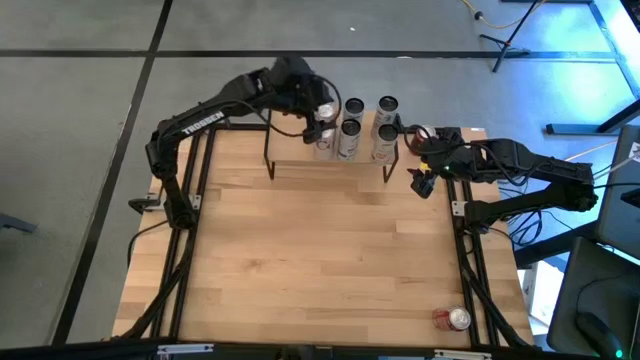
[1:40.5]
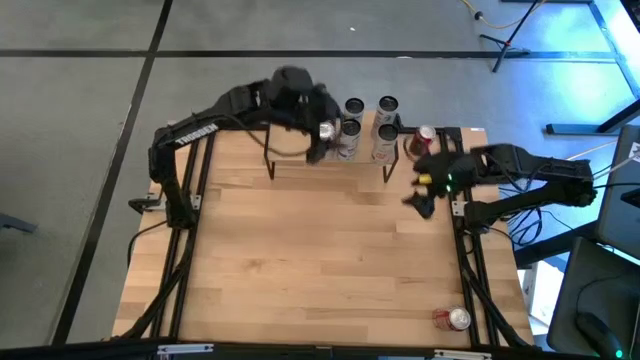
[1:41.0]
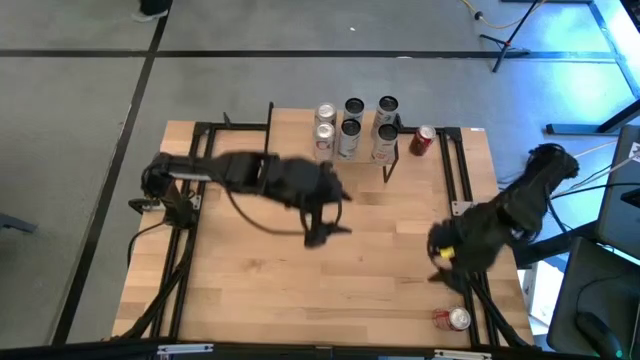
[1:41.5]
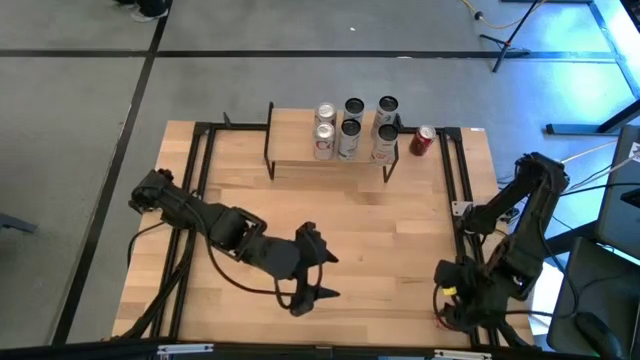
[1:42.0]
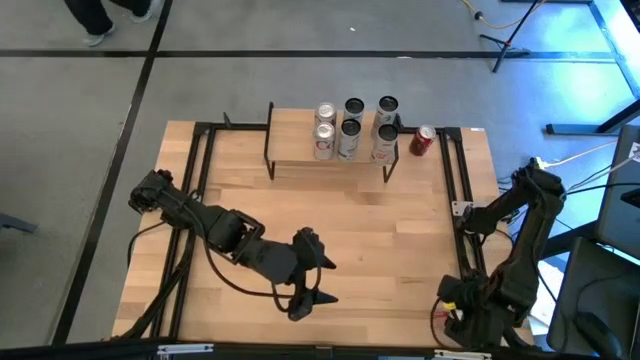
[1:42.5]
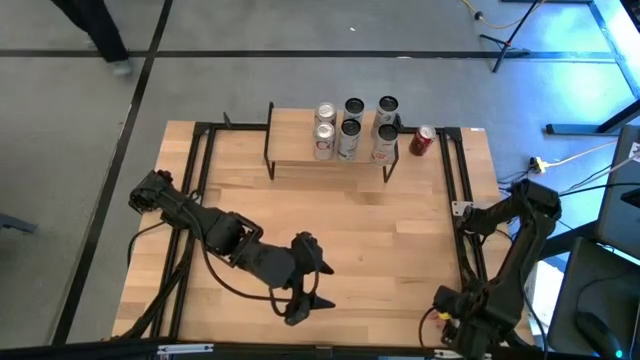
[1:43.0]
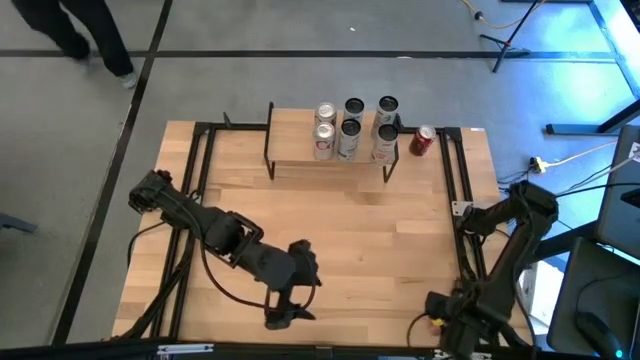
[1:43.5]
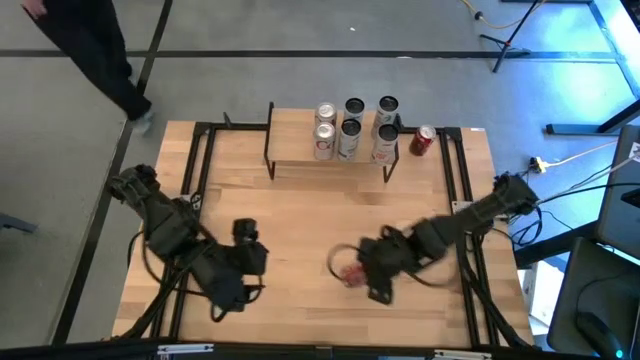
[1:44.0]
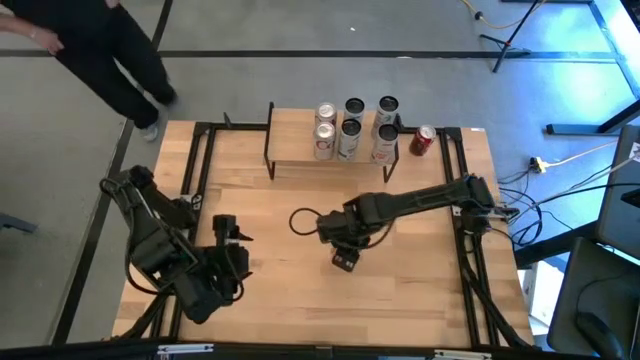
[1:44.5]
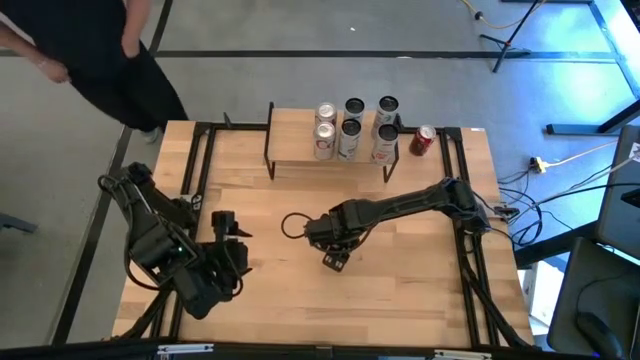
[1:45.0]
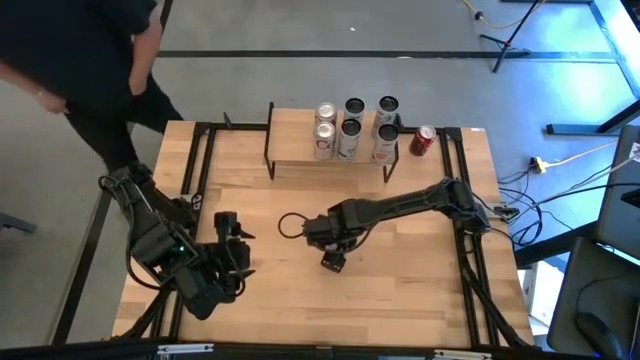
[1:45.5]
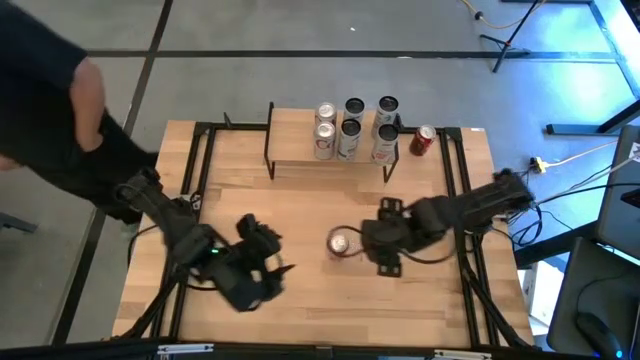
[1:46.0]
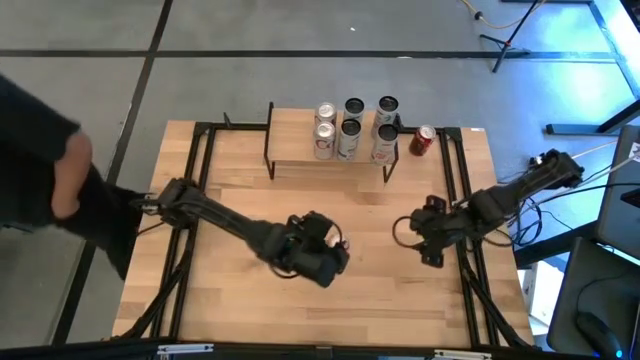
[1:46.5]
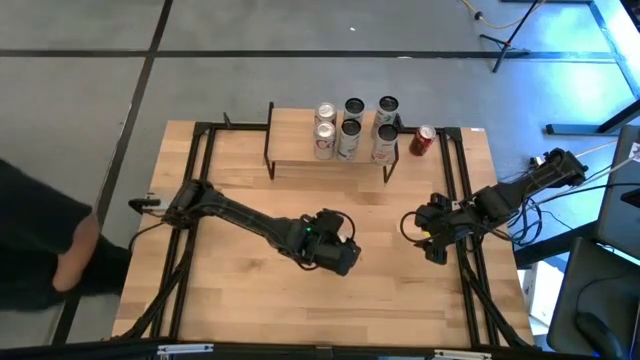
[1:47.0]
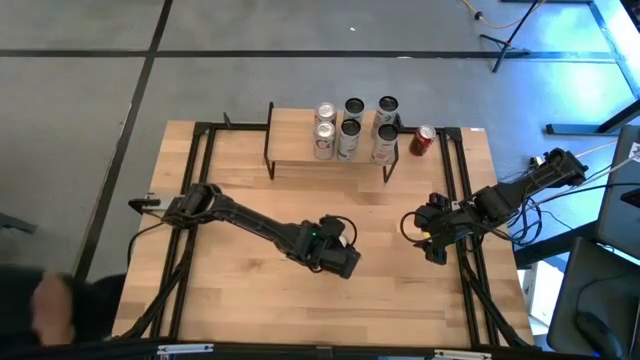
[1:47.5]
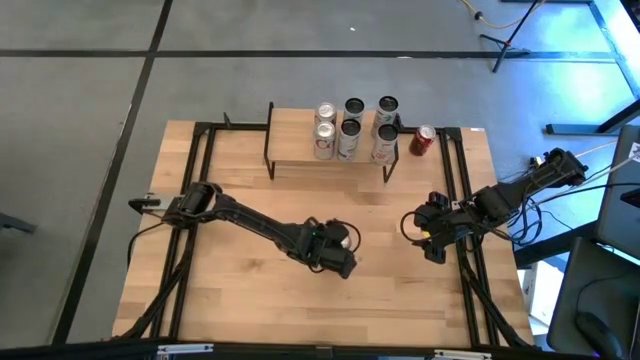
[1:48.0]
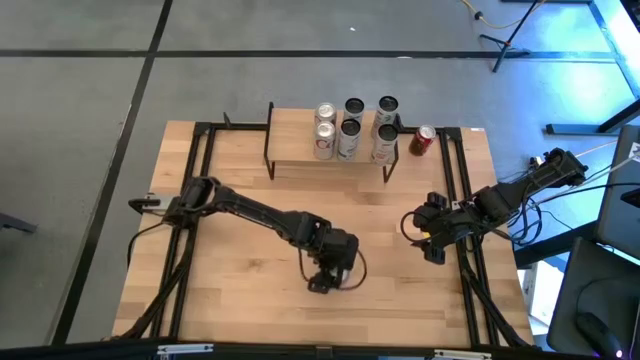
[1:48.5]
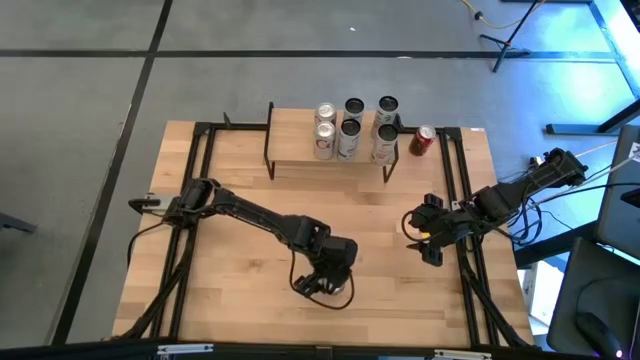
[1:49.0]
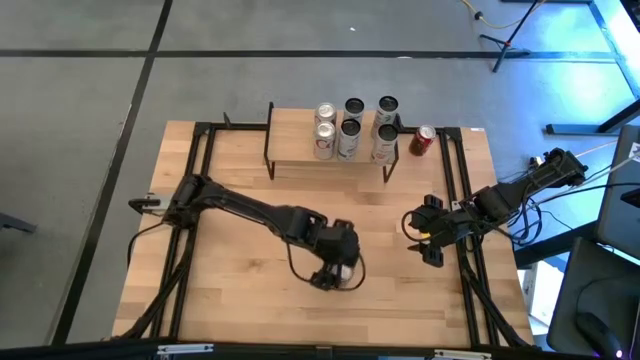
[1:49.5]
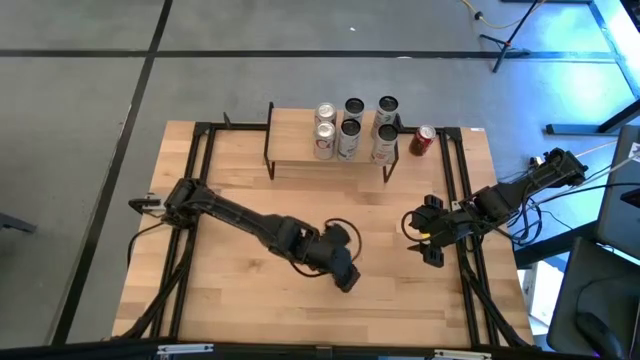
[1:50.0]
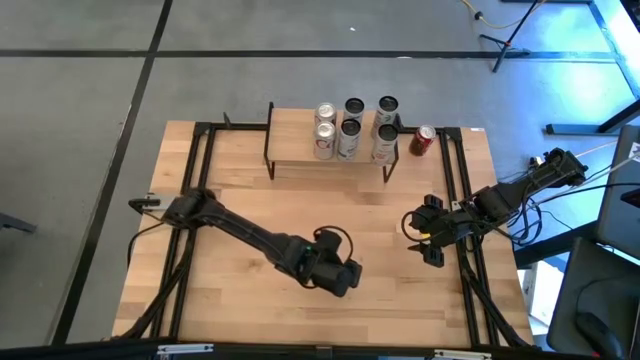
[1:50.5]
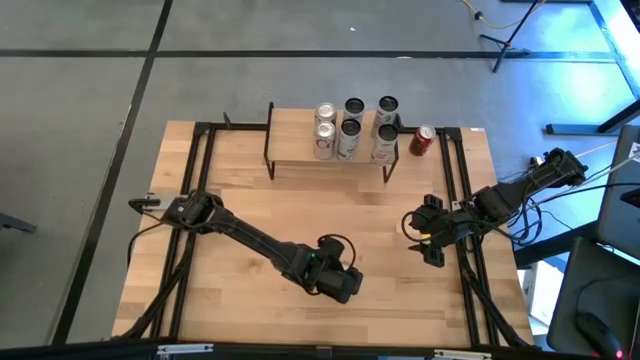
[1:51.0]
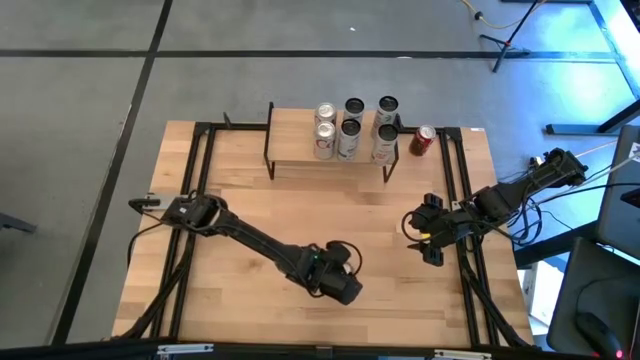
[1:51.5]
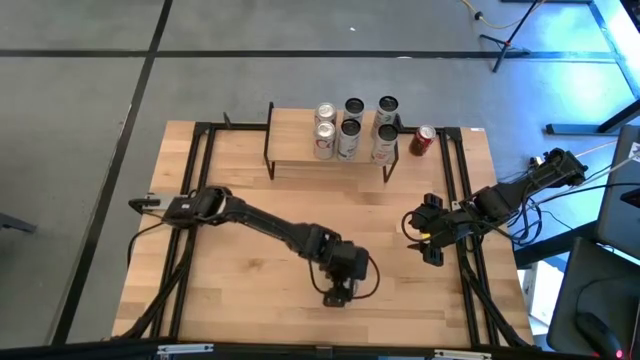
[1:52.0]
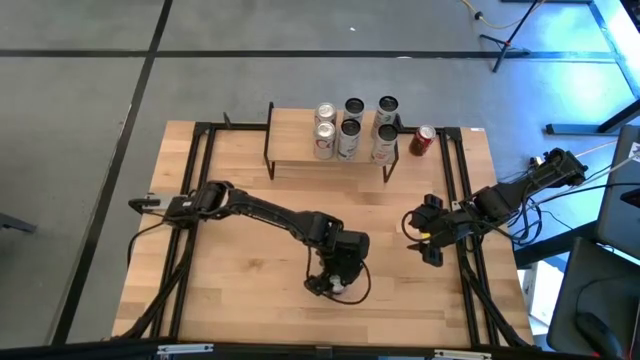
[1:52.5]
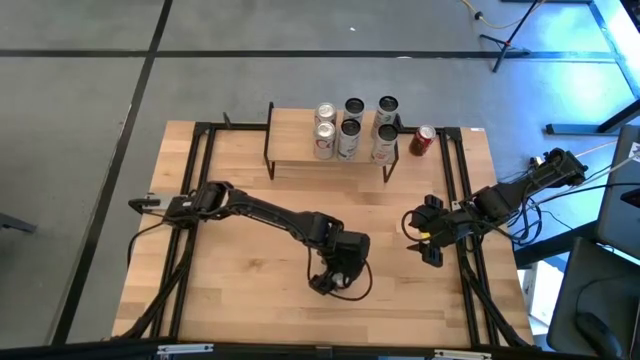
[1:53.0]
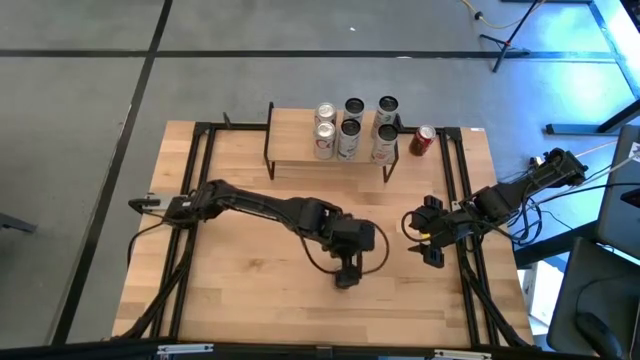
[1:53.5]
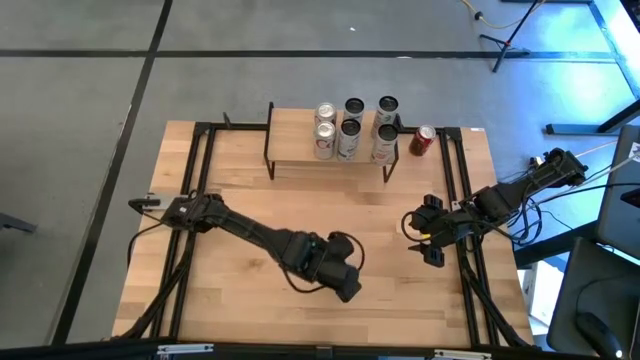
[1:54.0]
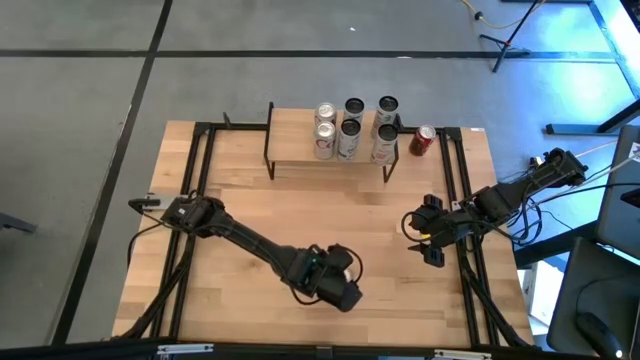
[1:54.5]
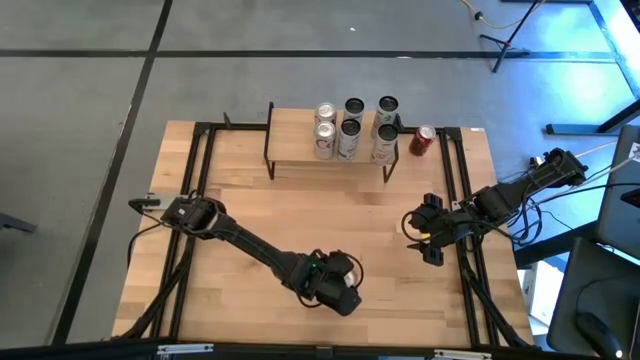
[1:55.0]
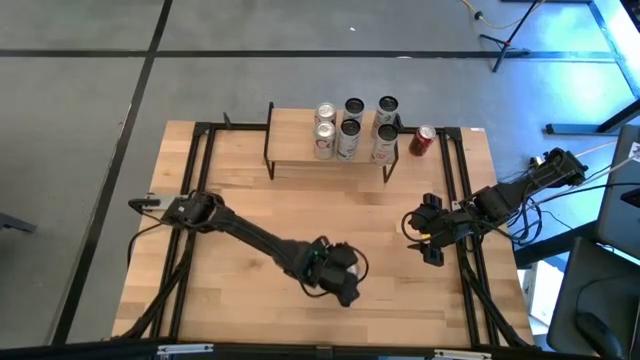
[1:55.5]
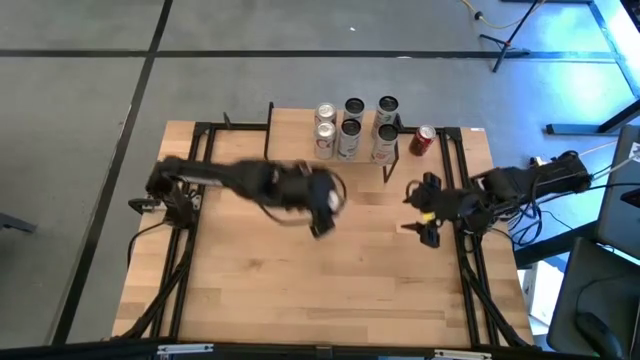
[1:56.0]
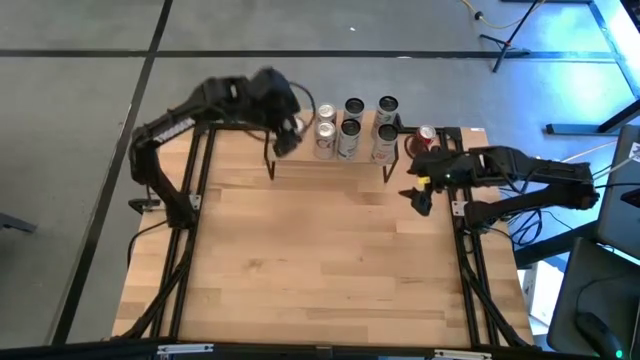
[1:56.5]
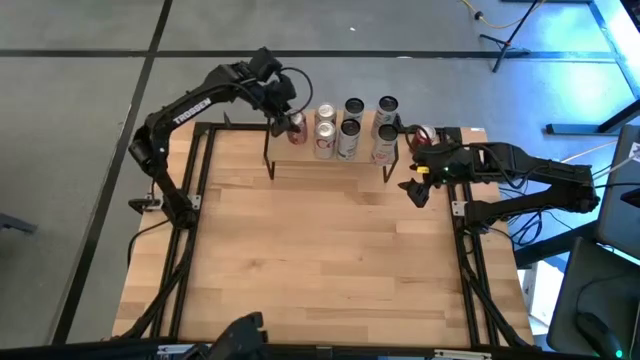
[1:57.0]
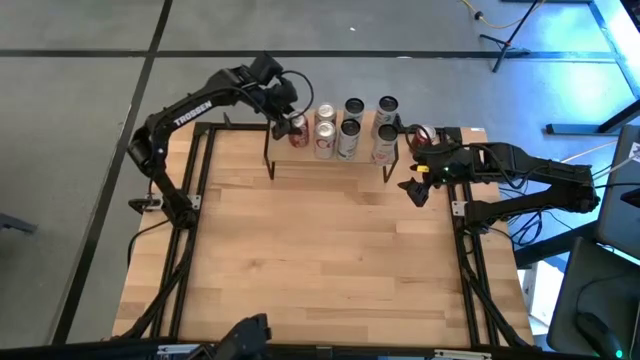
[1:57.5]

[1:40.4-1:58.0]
Task: Place canned beverage on shelf
Put the bottom red soda can on the shelf

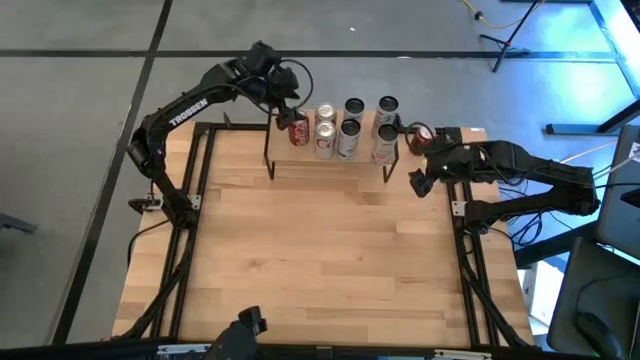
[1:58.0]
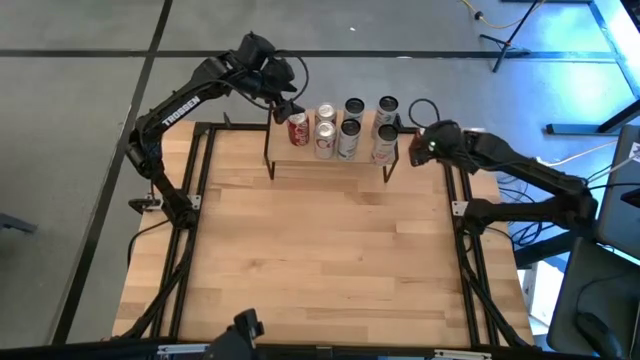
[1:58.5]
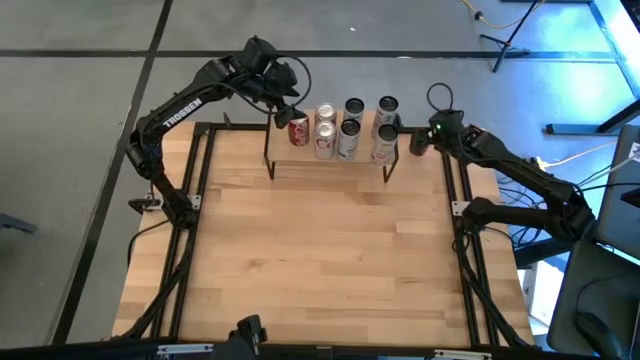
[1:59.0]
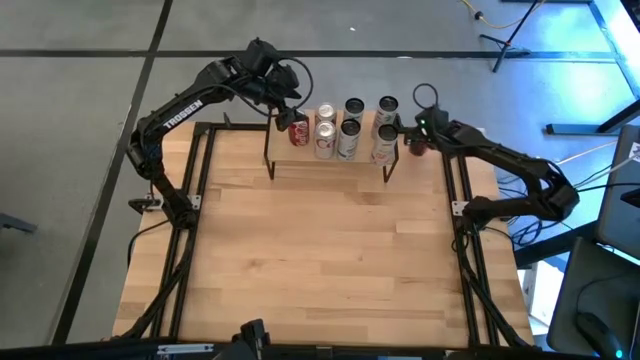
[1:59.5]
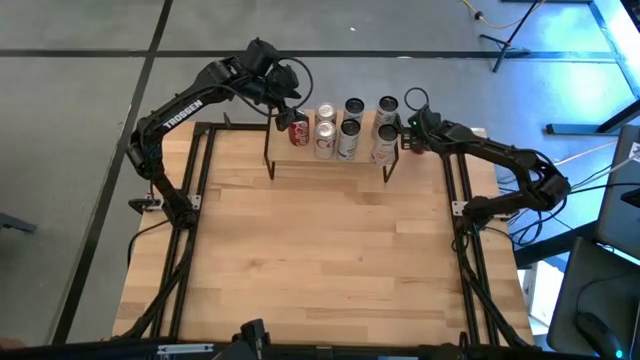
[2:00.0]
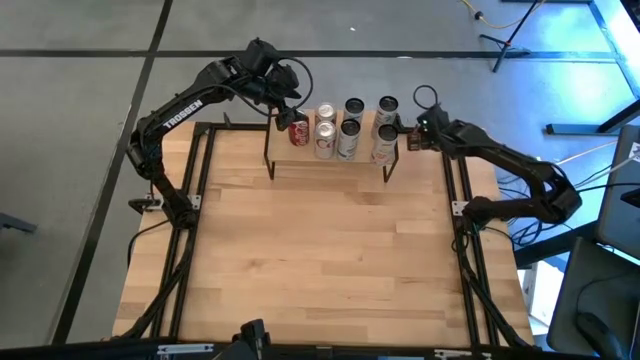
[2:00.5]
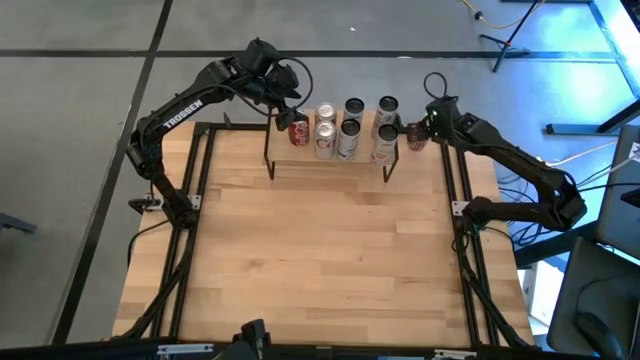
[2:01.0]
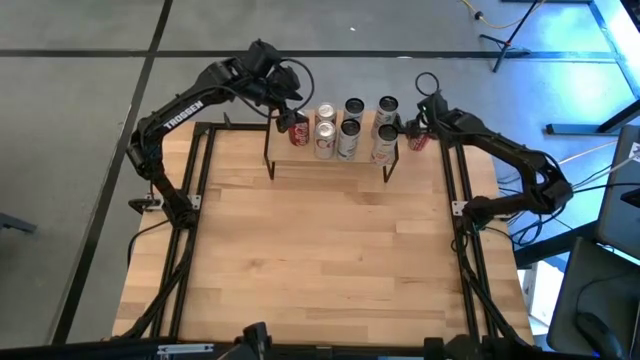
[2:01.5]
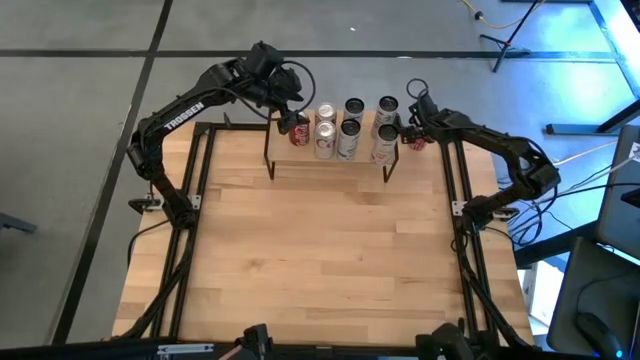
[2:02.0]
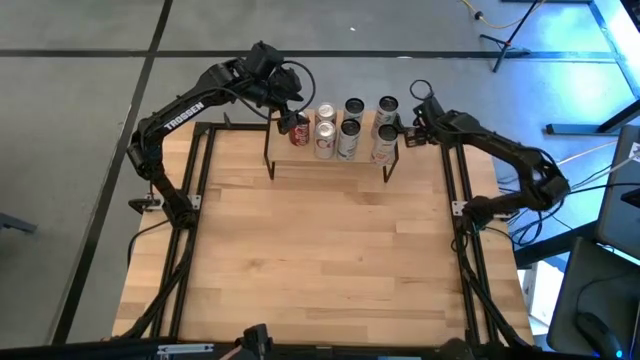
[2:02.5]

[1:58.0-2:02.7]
Put the red soda can on the shelf aligned with the other red soda can

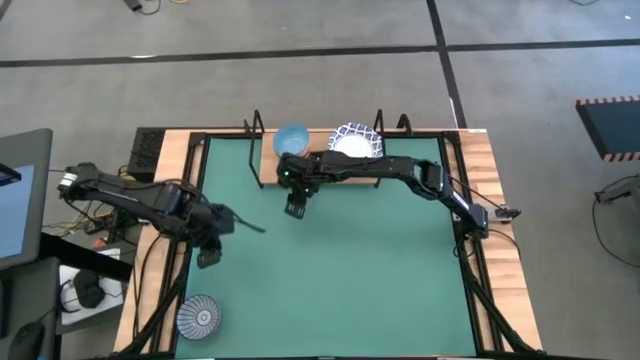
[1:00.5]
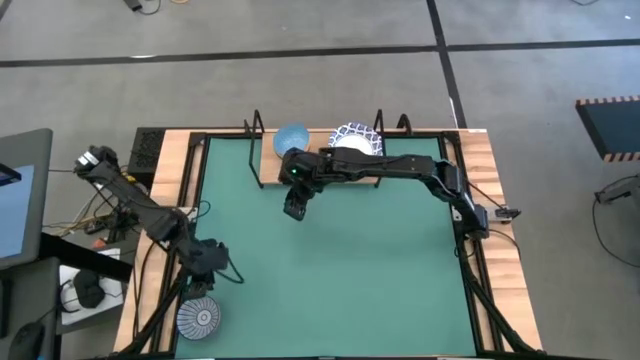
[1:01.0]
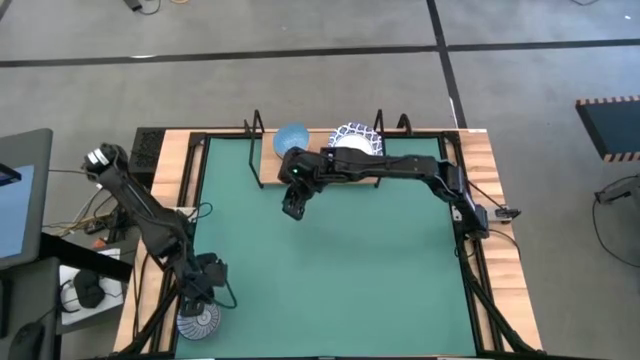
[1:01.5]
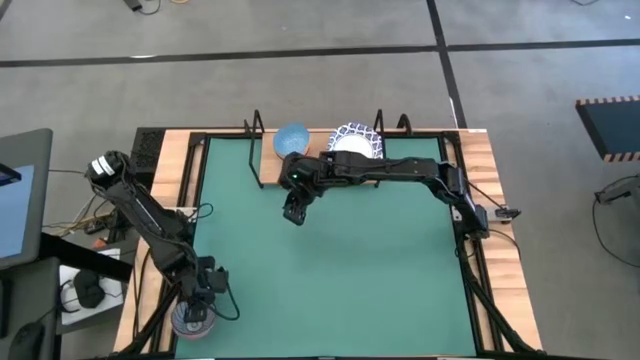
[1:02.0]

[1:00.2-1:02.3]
Task: Place and stack bowls onto a shelf
Stack the blue bowl on top of the light blue bowl on the shelf
